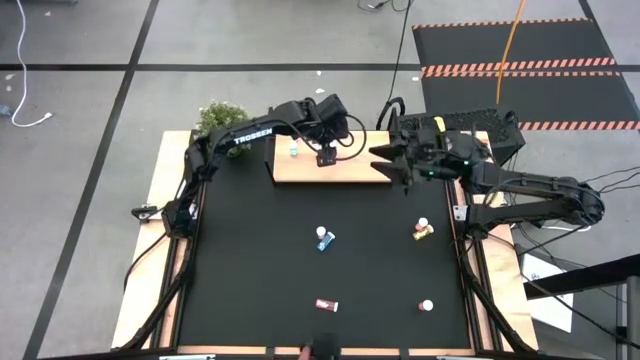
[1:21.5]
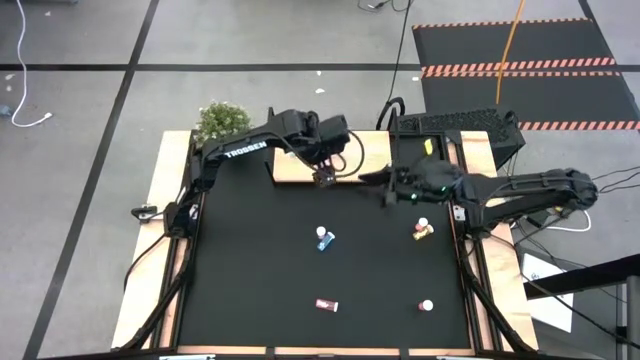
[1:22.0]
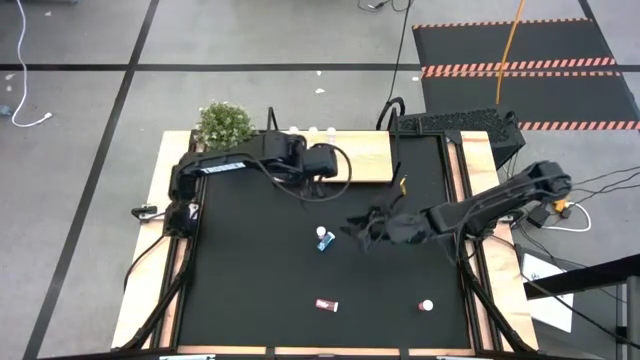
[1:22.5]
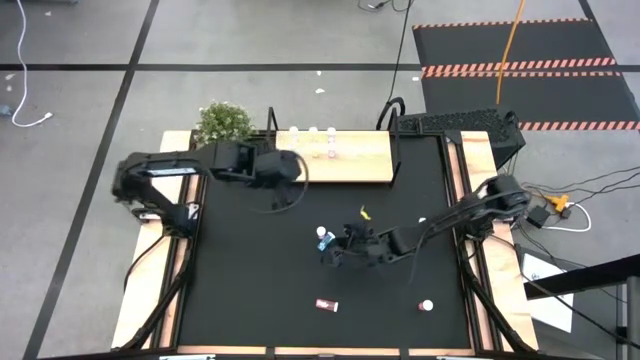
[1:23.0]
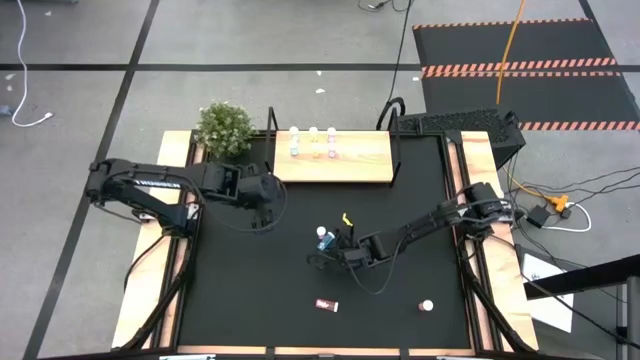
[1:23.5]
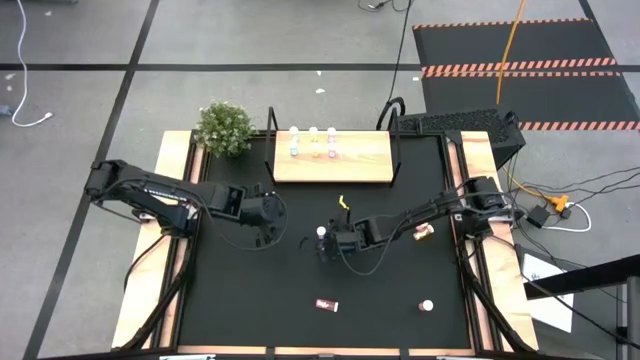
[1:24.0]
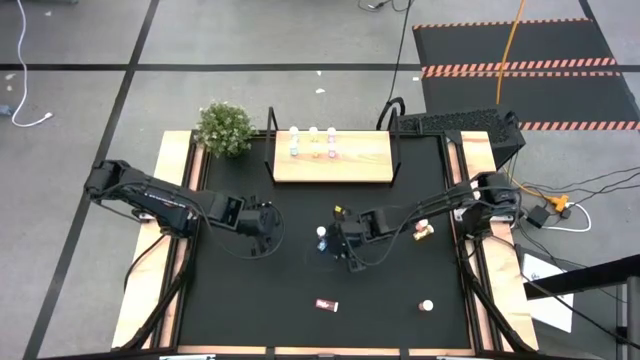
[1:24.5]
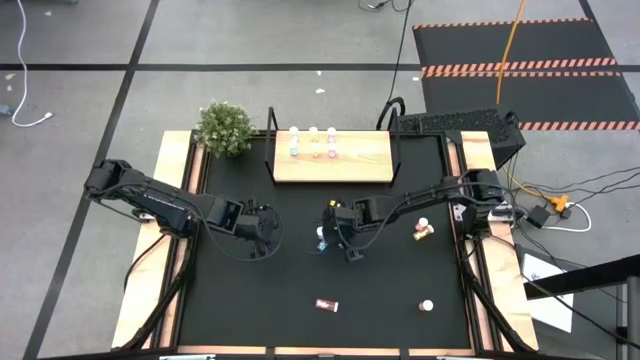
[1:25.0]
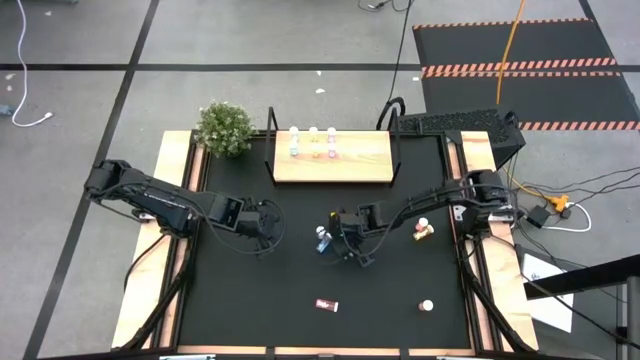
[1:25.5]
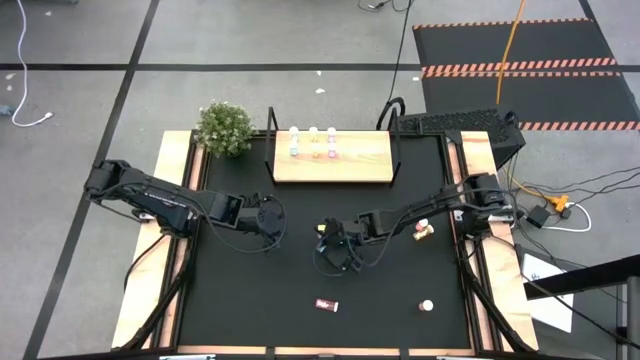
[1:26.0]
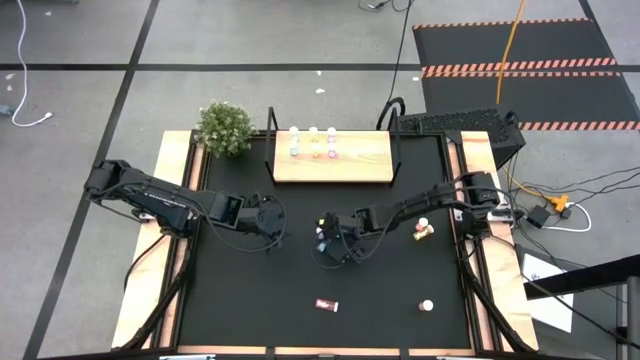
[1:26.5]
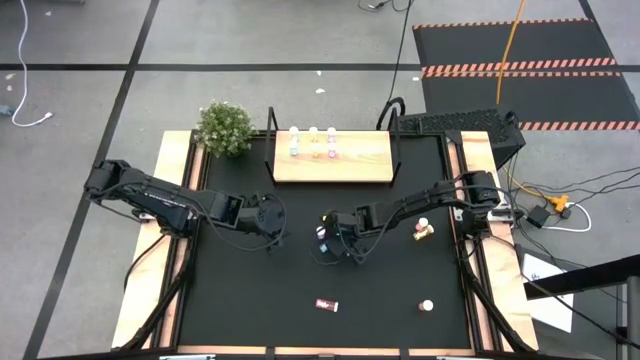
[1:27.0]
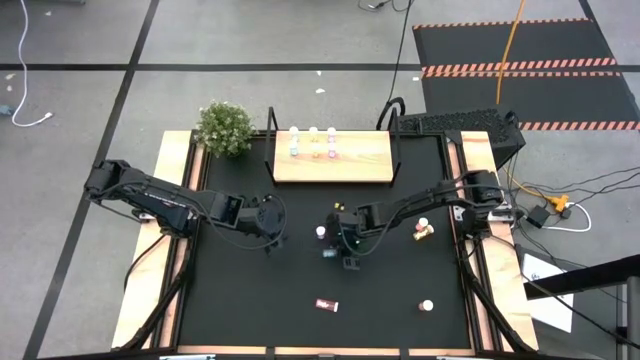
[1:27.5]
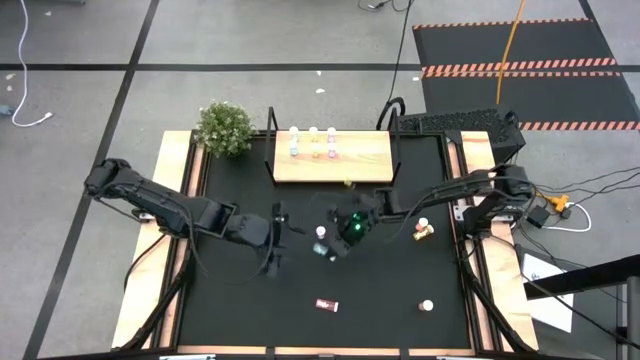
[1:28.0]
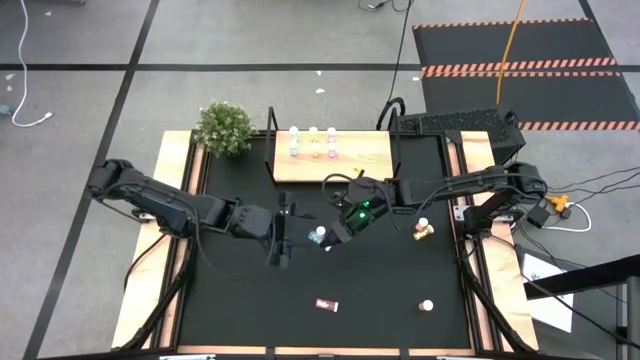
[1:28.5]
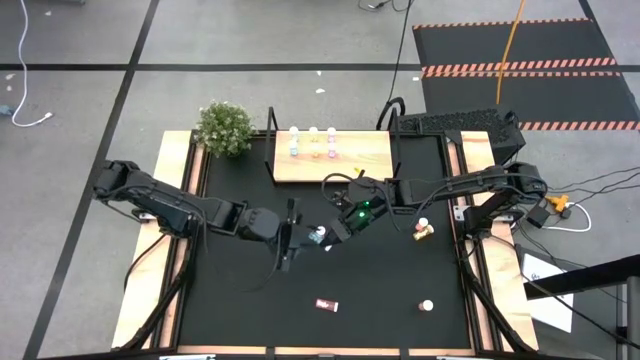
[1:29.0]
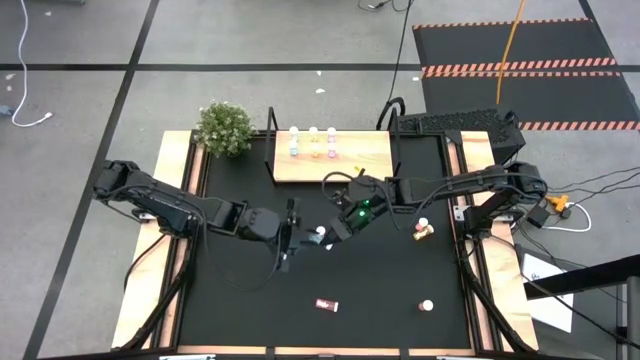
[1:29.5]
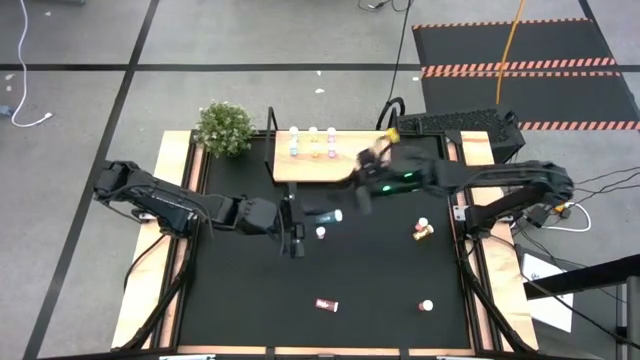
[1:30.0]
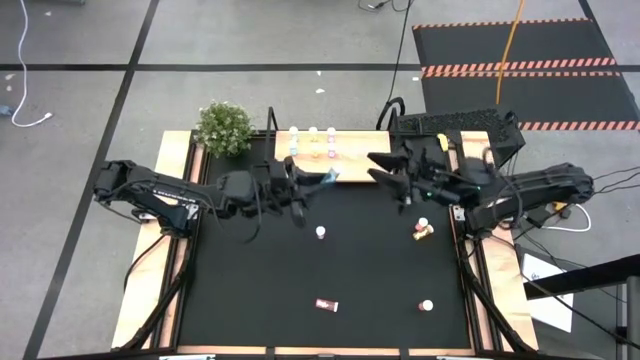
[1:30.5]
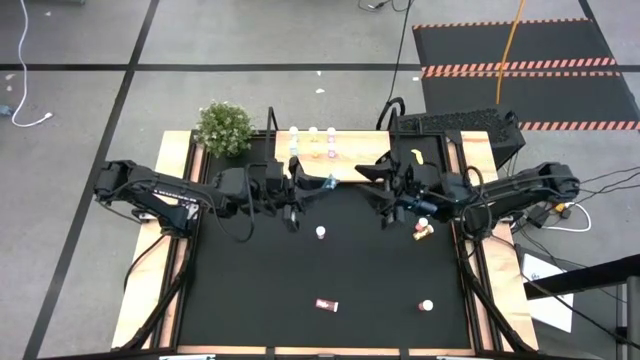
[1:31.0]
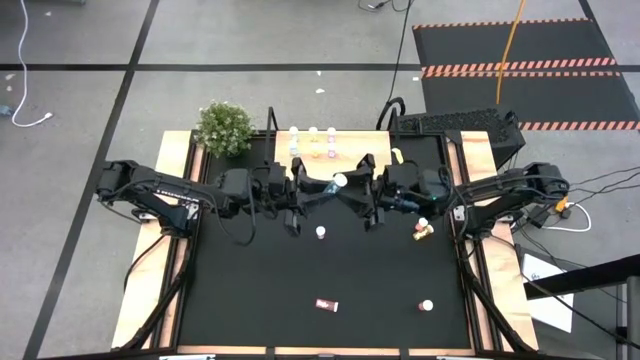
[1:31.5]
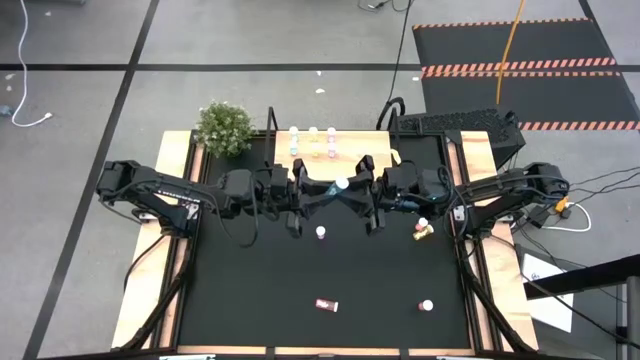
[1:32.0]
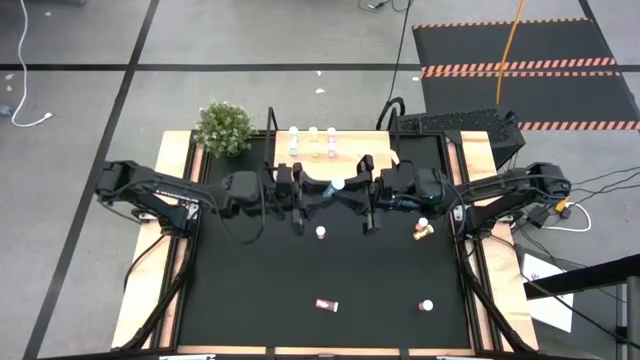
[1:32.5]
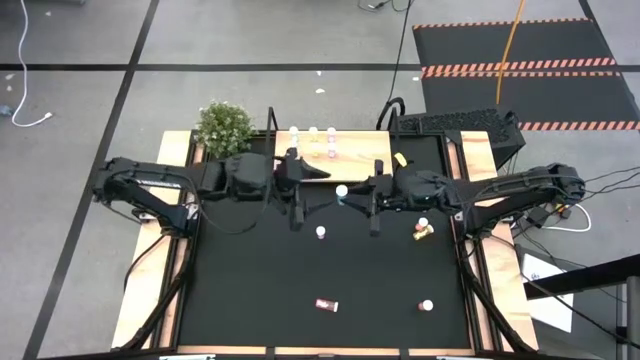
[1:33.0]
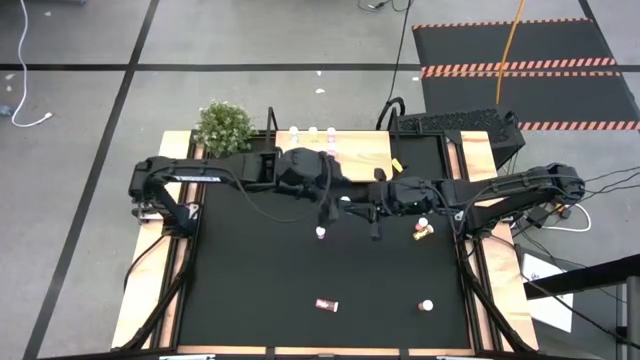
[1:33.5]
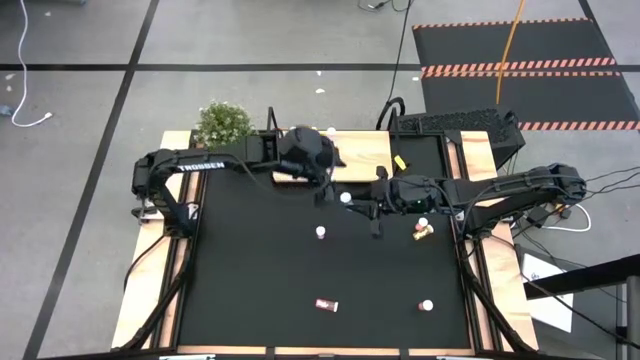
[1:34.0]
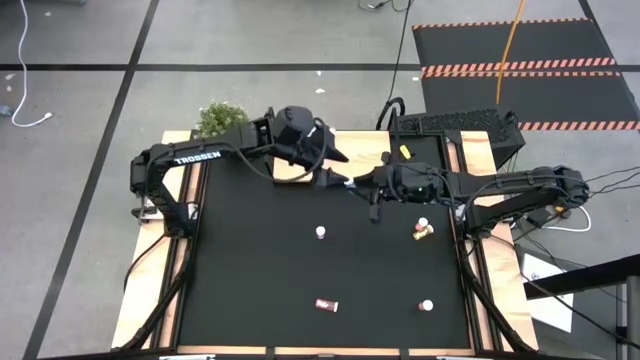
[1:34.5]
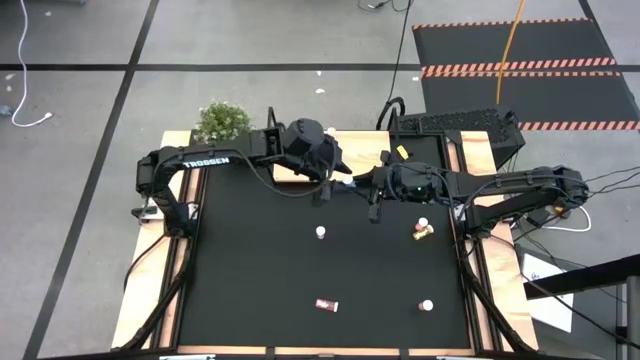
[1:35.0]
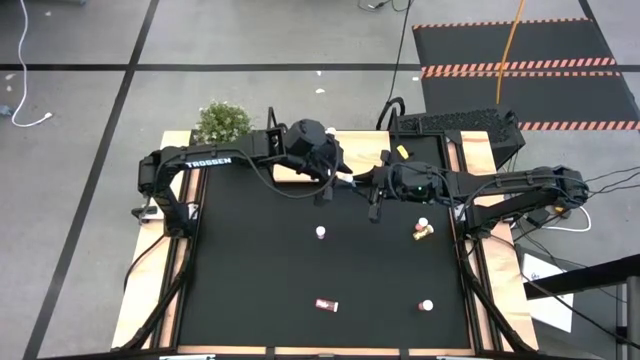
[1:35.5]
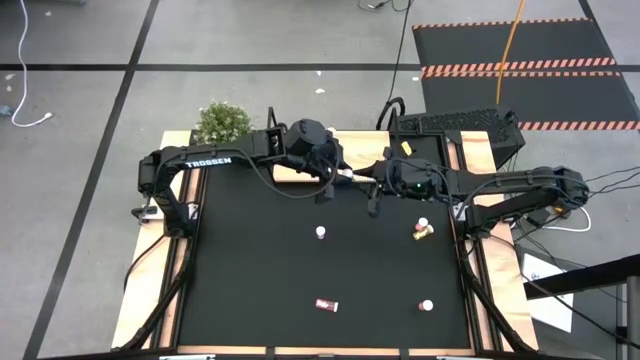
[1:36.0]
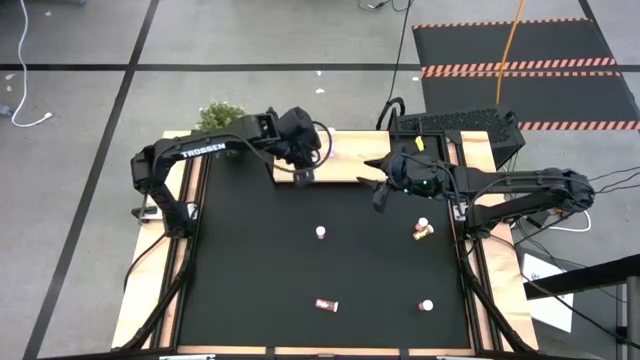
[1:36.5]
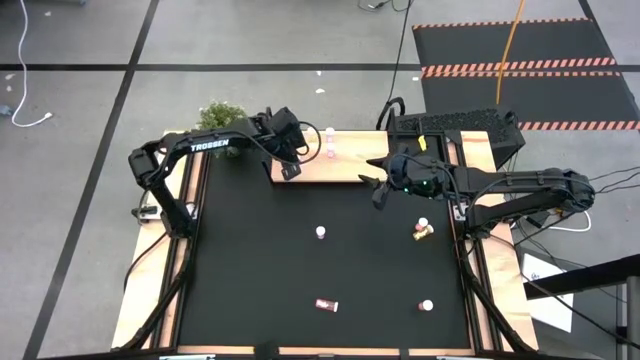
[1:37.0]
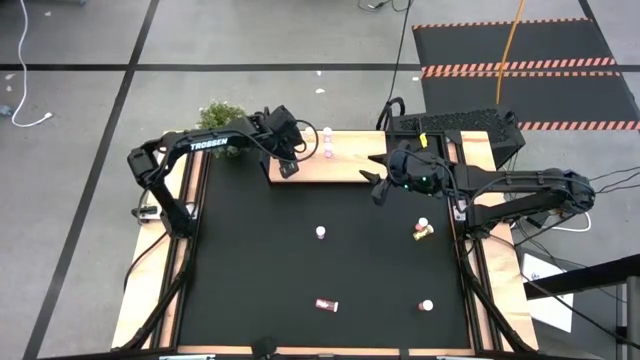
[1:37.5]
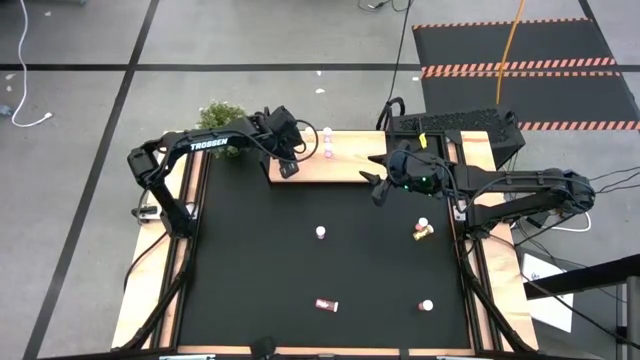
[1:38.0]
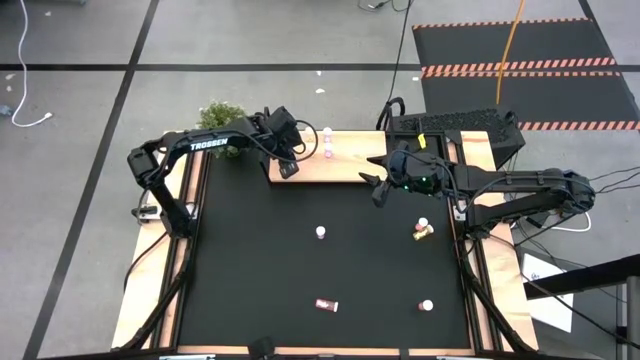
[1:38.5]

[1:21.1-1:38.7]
Task: Pick and place medicine bottles onto shelf by color
Put the blue pill bottle on the shelf

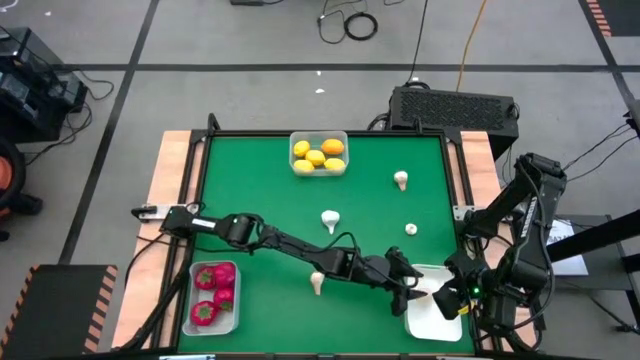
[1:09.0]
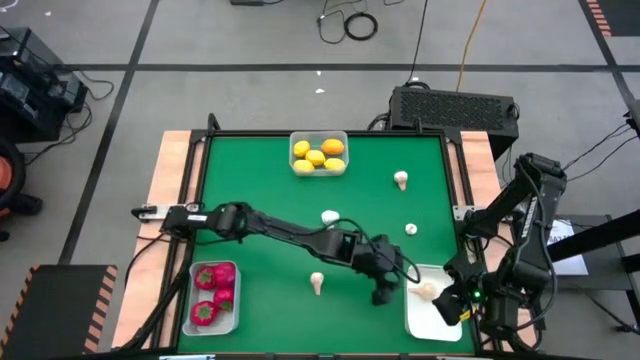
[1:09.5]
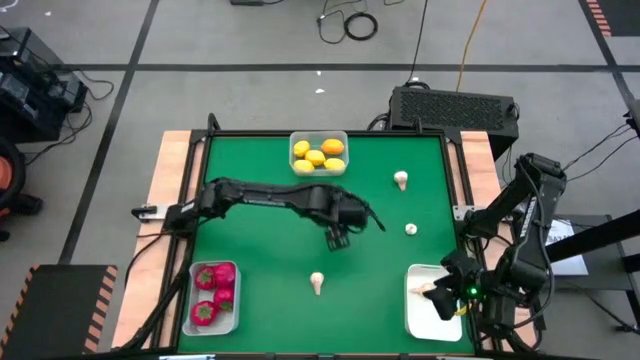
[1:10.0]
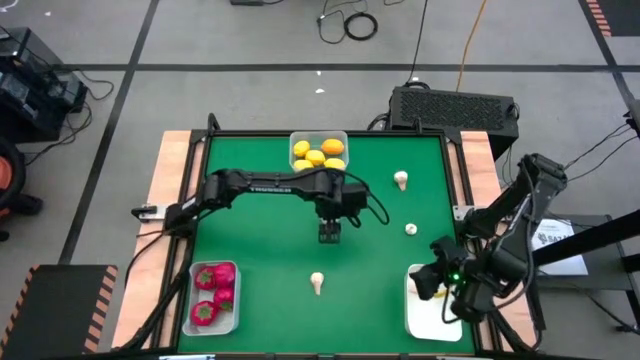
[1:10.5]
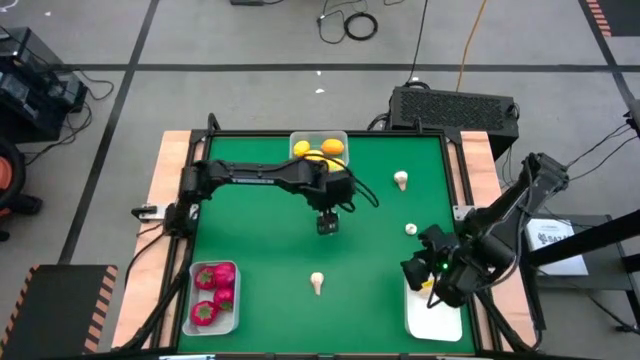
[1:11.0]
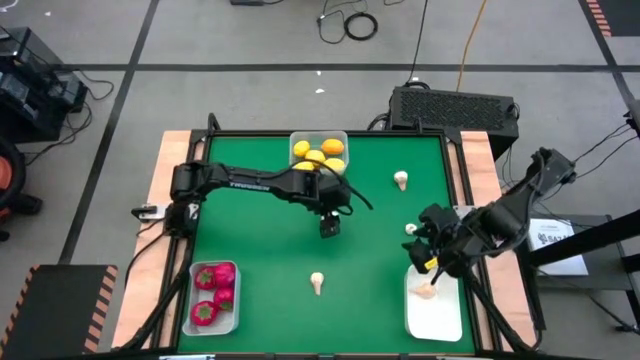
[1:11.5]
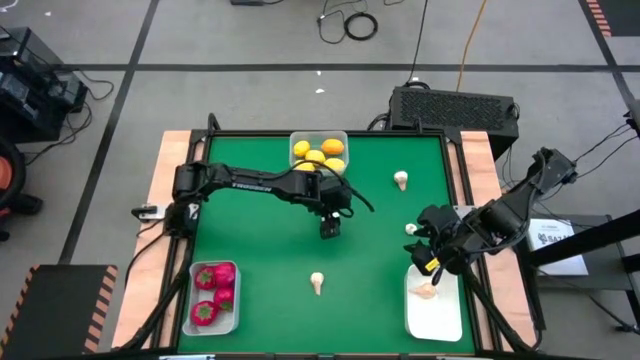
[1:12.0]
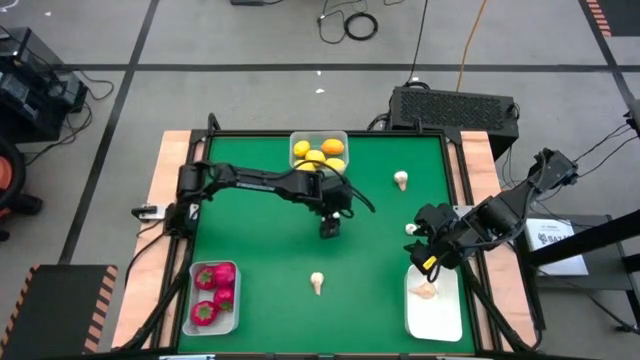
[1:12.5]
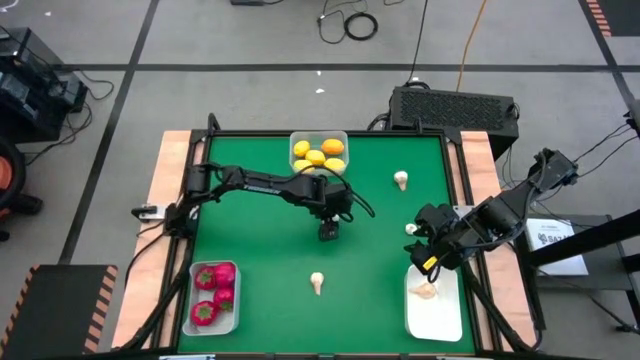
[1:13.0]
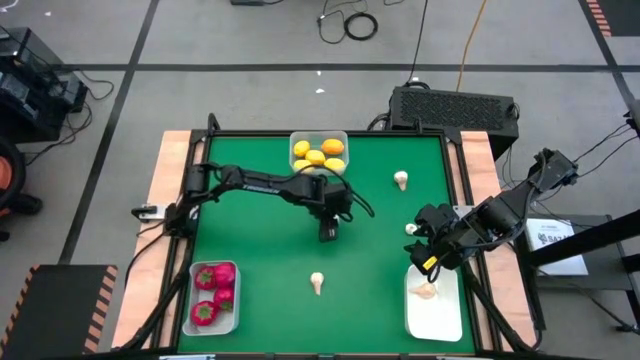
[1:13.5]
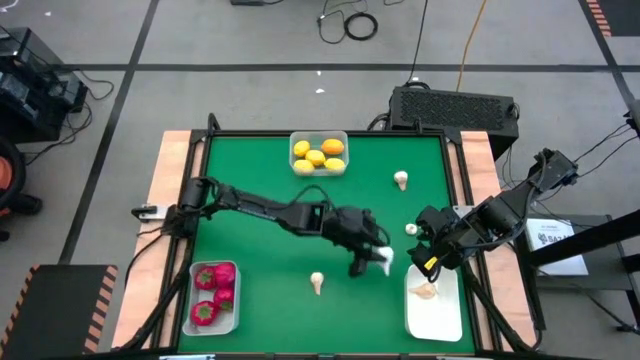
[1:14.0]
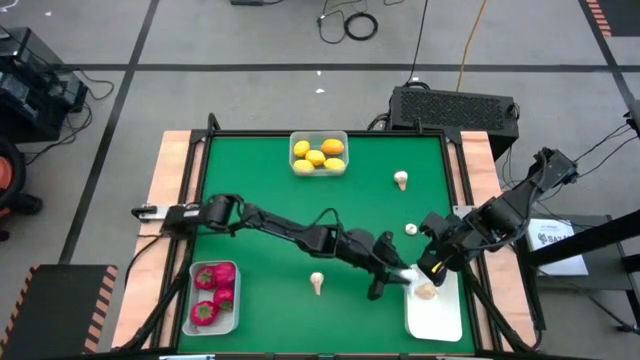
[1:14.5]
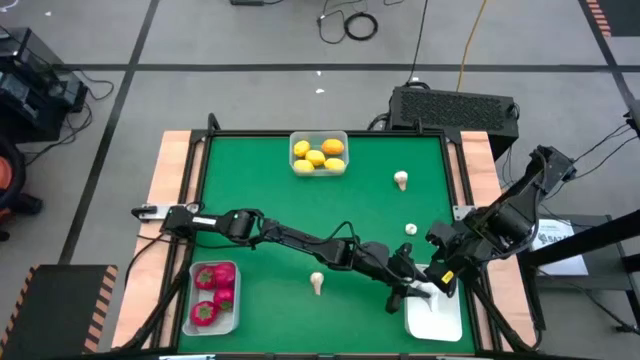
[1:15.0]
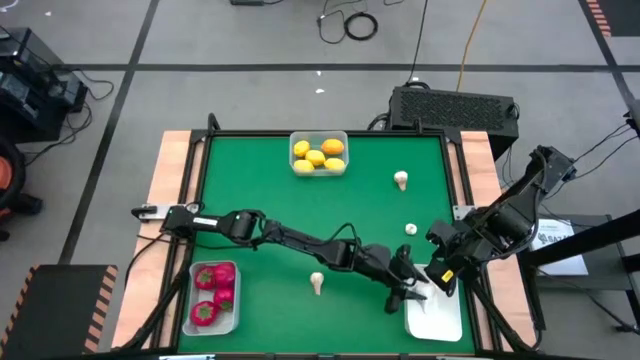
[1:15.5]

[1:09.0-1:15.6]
Task: Sort produce into baskets
Put the garlic into the white bin
